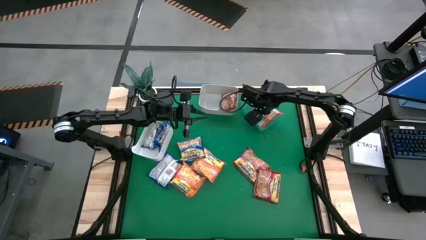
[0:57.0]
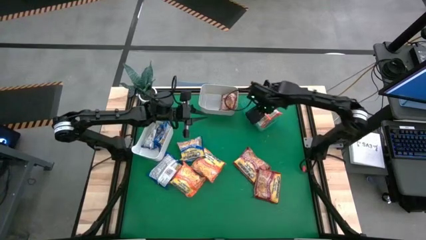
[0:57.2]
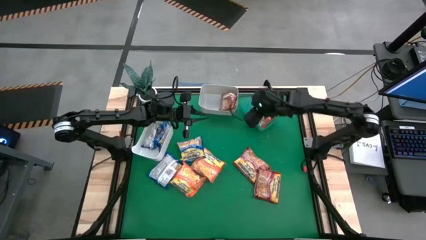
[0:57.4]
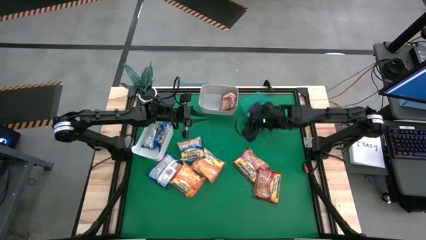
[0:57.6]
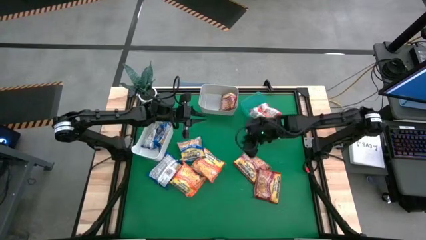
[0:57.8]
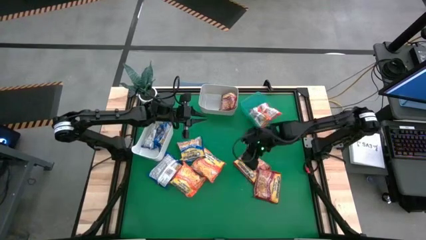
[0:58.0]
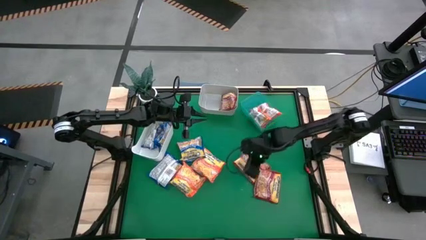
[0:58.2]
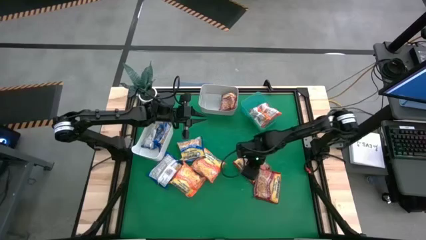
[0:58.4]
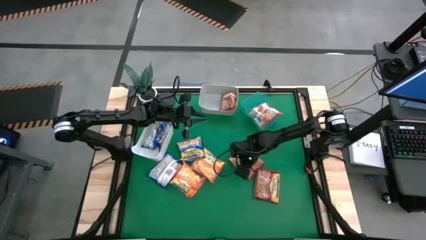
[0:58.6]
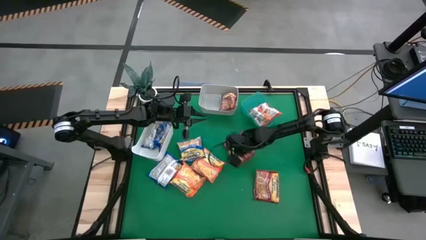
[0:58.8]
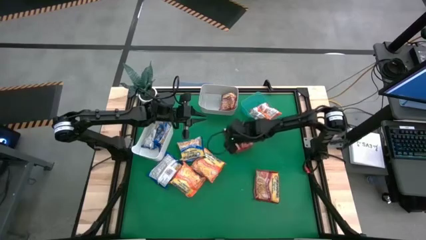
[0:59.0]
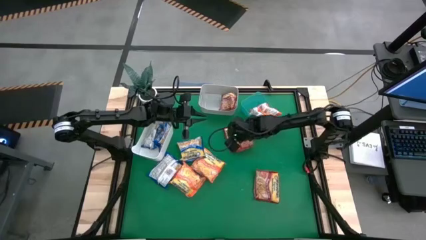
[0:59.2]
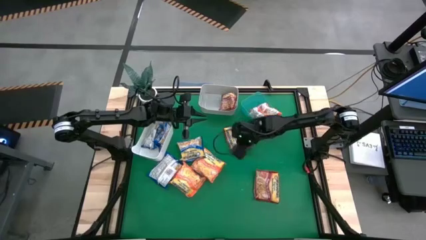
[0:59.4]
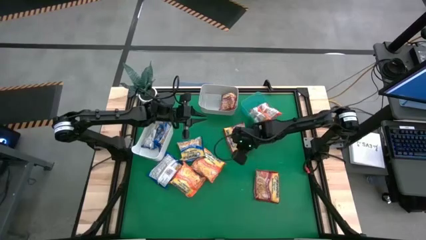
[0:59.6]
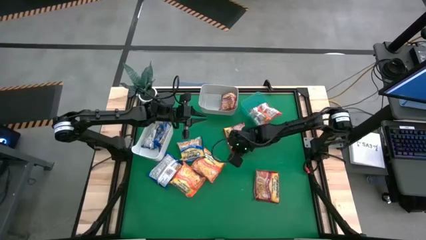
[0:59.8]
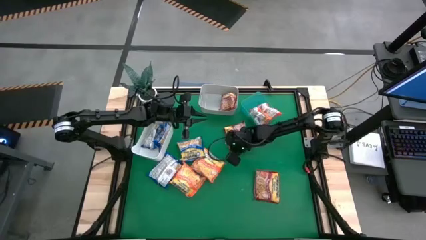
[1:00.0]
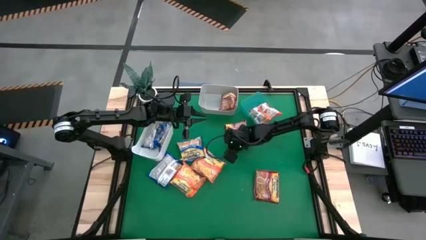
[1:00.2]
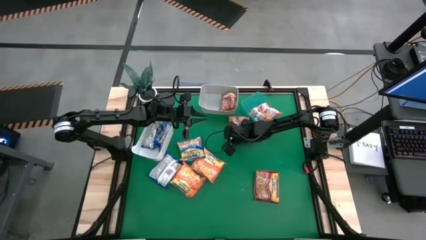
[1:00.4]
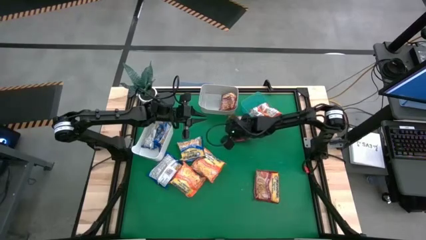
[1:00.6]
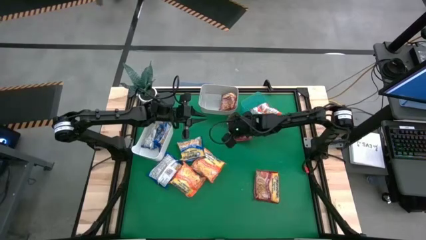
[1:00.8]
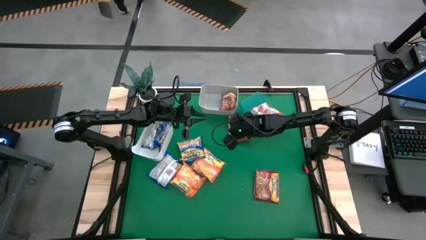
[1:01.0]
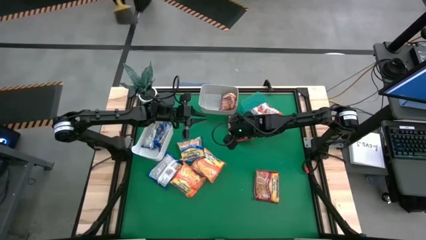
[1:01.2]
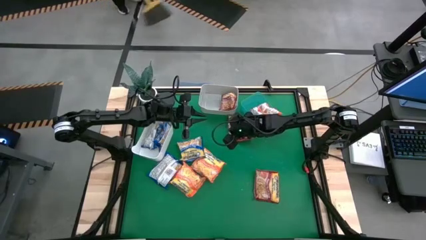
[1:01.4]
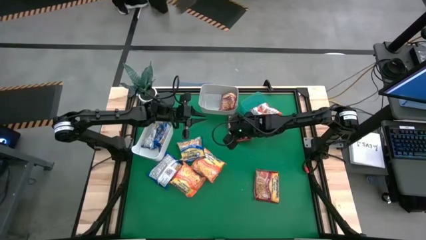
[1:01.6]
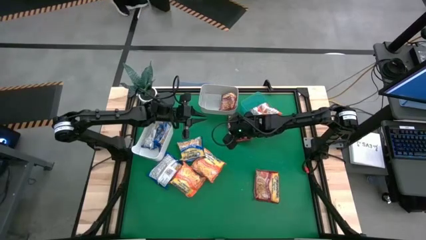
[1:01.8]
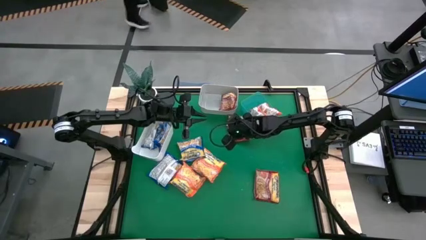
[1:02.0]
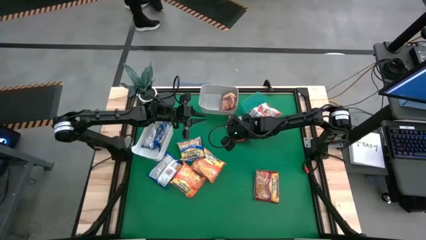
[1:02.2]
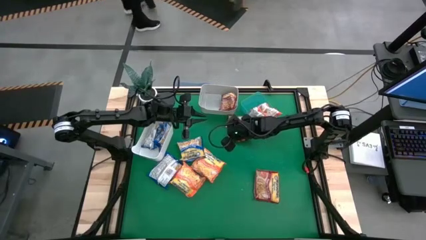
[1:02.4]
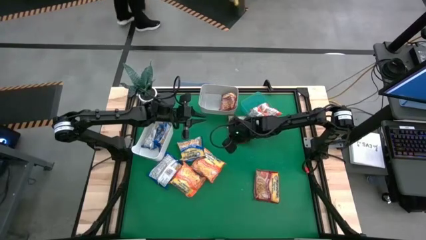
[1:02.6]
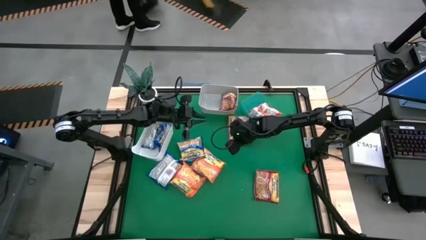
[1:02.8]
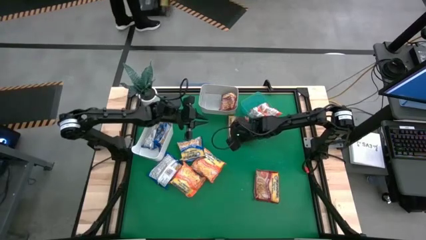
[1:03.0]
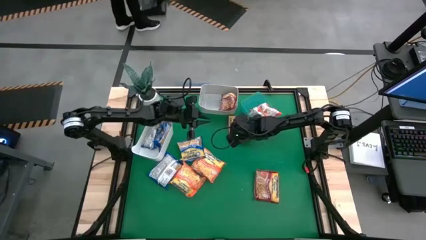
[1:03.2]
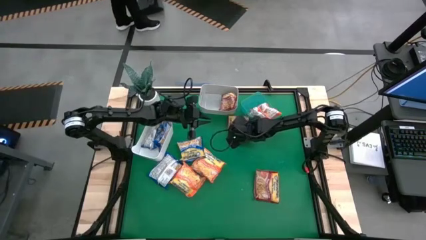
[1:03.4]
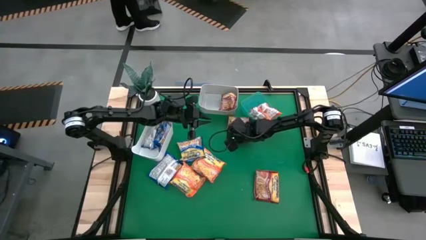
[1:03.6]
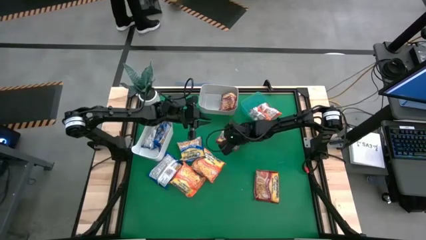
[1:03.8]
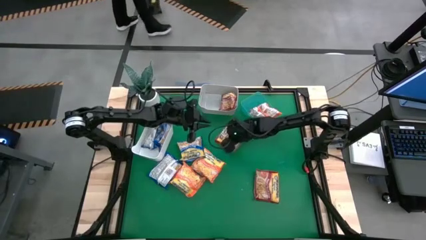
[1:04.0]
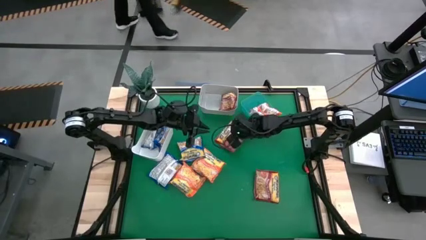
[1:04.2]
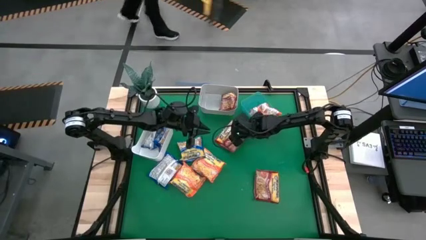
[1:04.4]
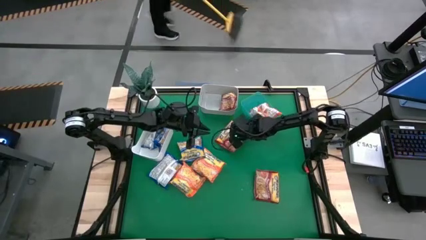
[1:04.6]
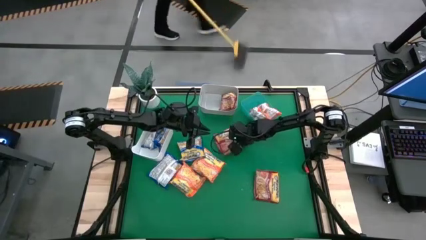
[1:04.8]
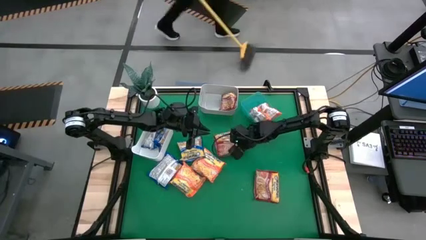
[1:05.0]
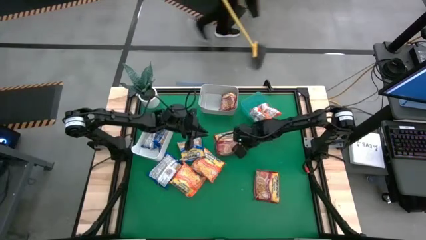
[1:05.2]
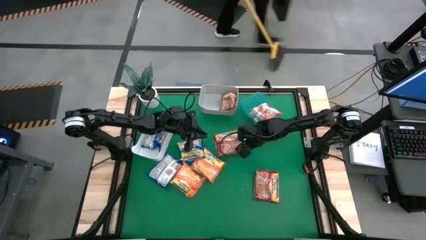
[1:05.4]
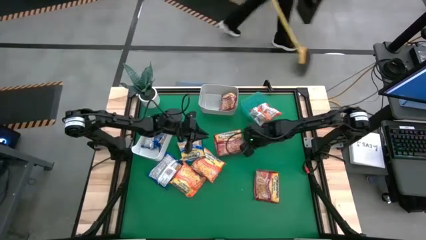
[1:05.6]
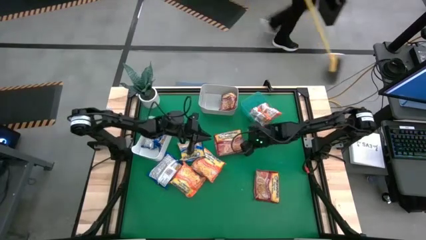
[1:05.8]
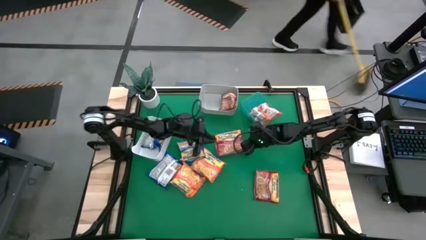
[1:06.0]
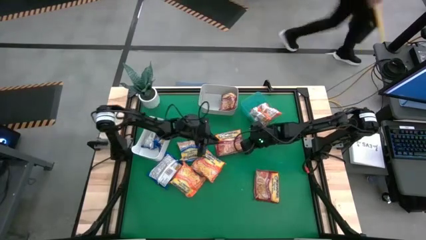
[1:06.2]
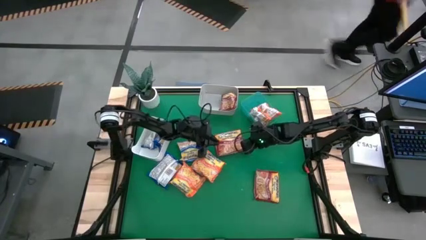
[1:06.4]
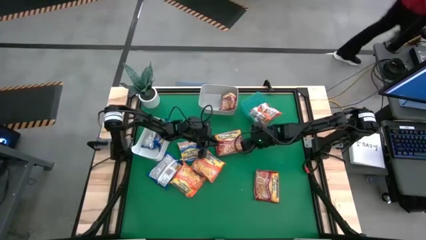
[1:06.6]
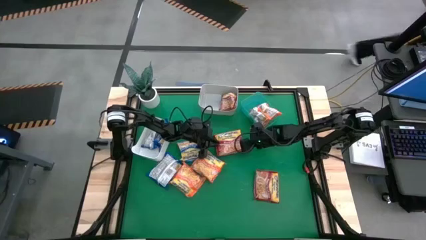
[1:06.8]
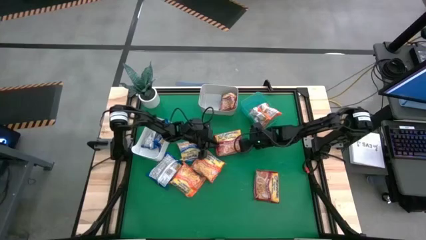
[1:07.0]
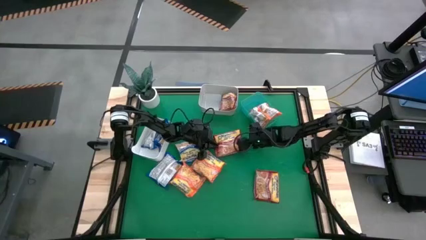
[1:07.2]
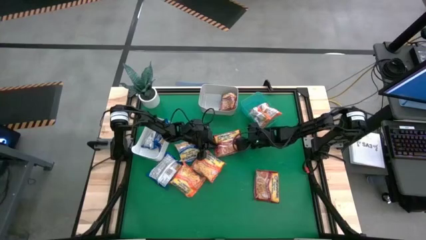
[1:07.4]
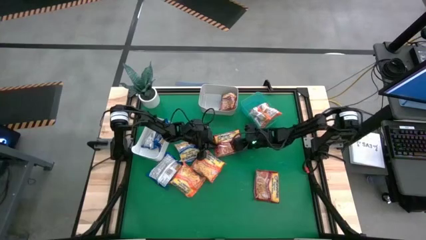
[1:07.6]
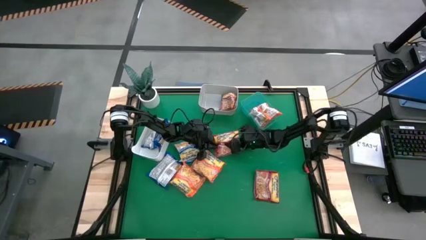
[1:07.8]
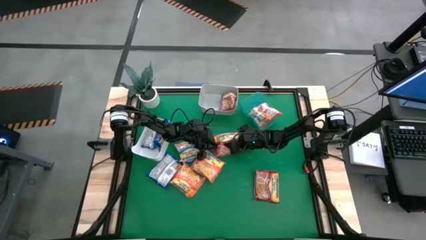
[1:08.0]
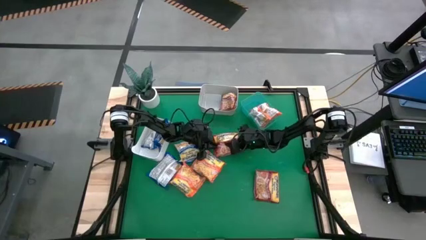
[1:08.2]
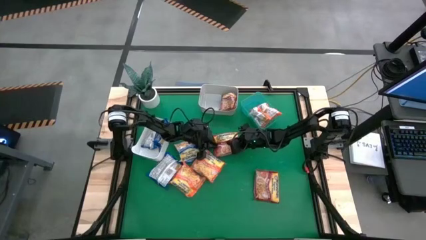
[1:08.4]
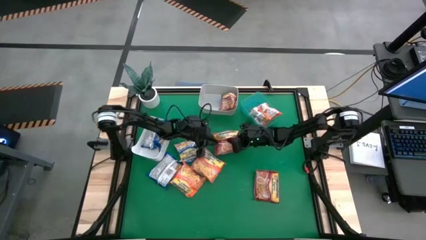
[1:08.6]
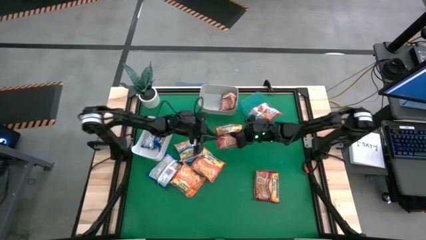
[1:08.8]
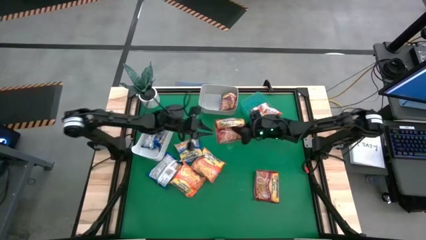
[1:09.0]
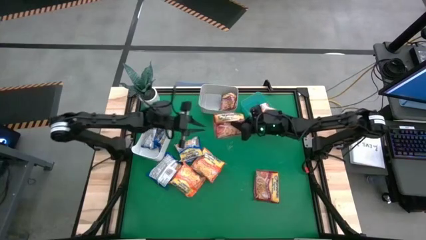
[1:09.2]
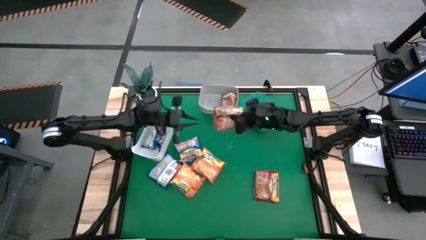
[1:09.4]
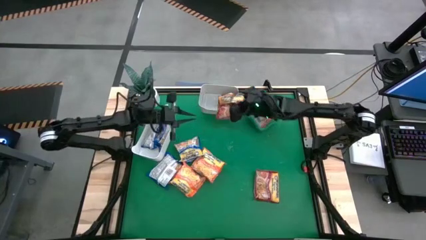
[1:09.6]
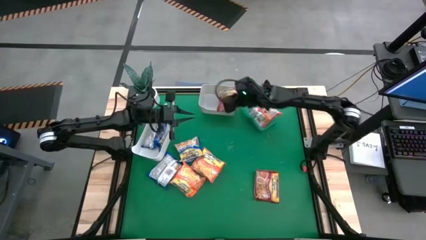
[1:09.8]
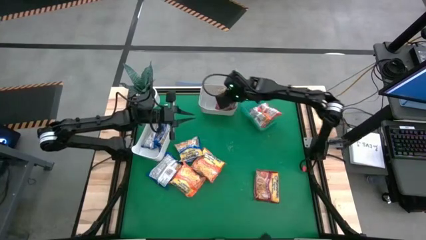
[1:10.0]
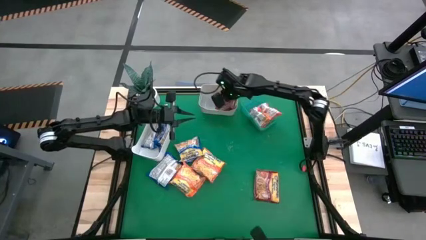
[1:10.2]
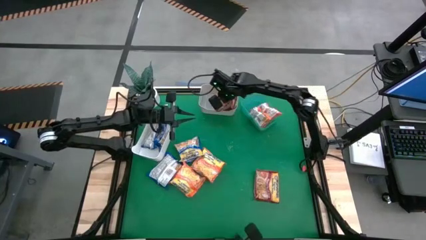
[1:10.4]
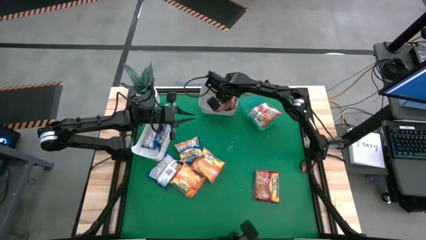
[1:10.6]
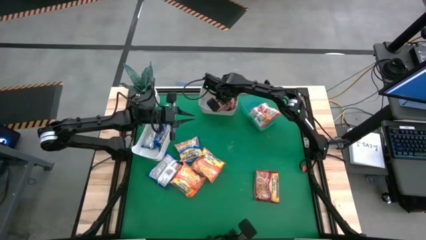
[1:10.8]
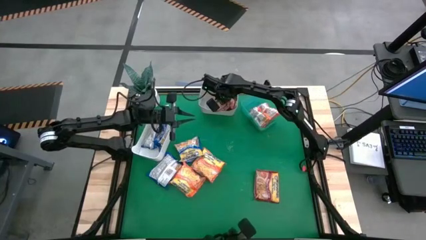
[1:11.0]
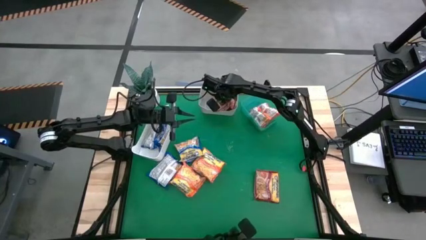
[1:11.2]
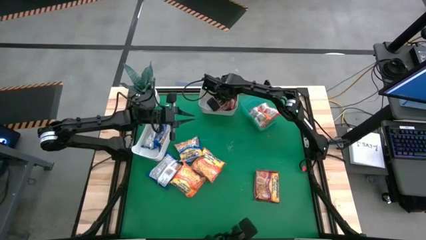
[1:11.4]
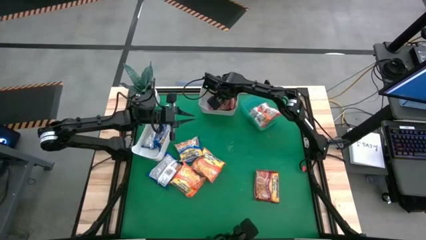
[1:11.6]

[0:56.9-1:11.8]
Task: Sort Maruchan noodles
Put the red noodle pack into the gray bin
